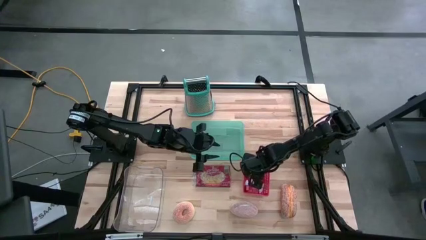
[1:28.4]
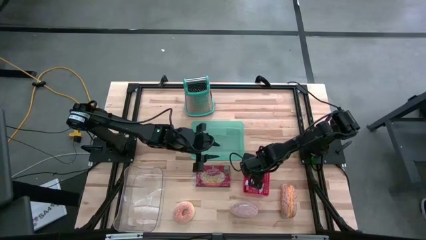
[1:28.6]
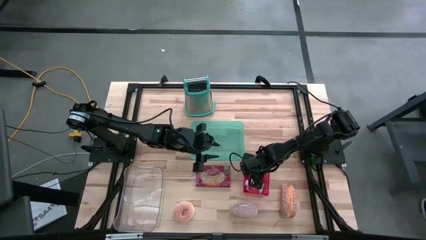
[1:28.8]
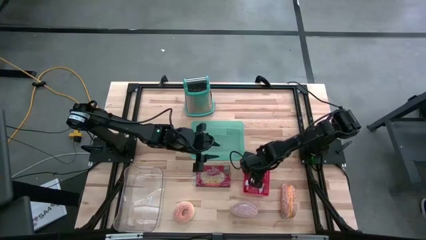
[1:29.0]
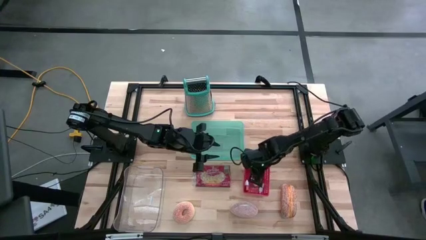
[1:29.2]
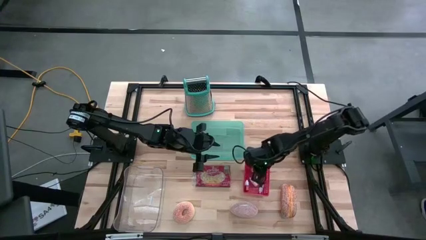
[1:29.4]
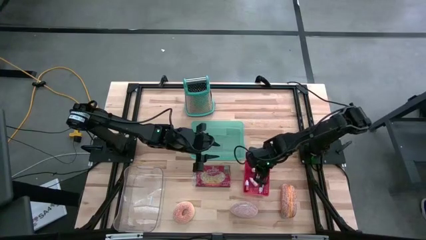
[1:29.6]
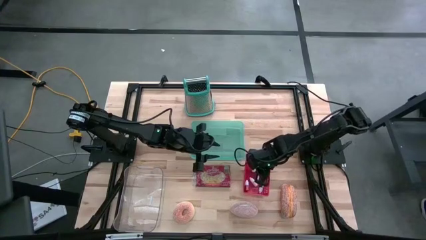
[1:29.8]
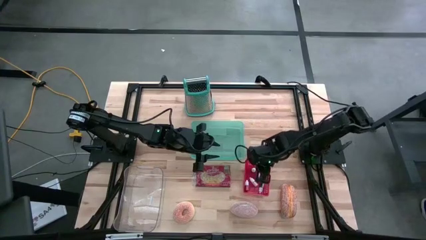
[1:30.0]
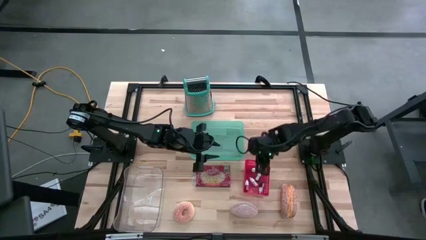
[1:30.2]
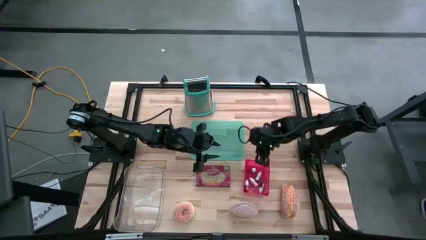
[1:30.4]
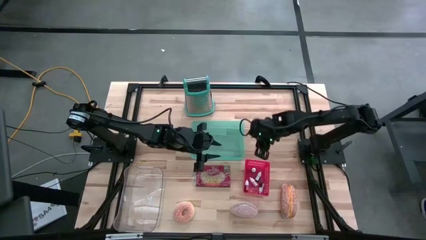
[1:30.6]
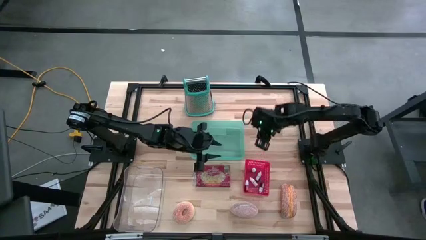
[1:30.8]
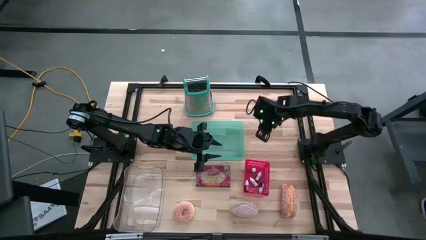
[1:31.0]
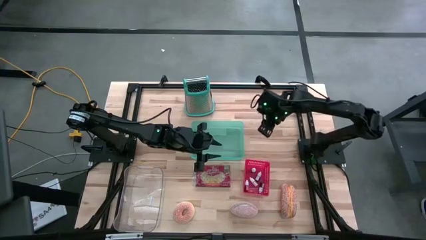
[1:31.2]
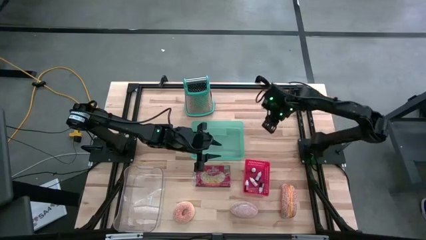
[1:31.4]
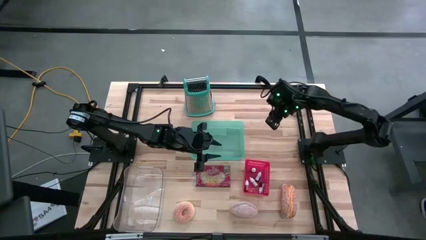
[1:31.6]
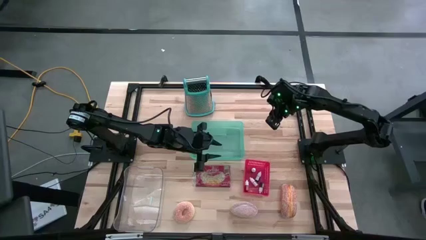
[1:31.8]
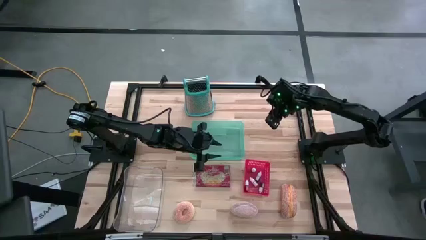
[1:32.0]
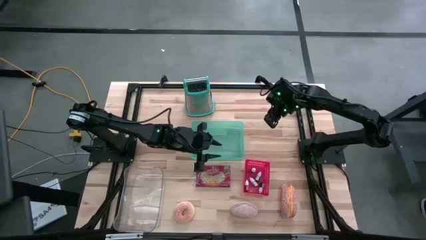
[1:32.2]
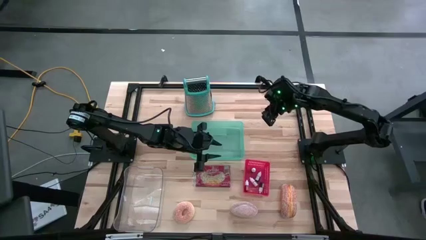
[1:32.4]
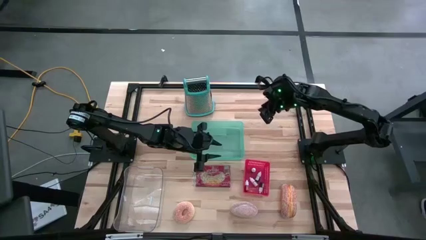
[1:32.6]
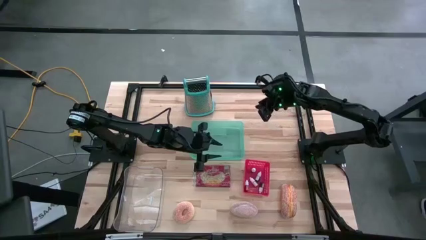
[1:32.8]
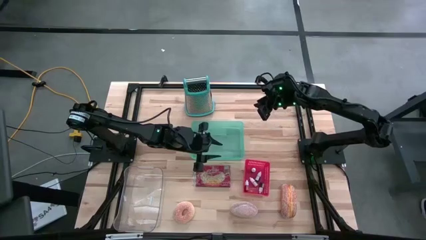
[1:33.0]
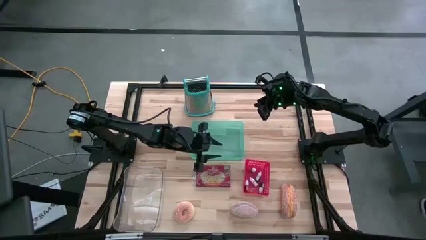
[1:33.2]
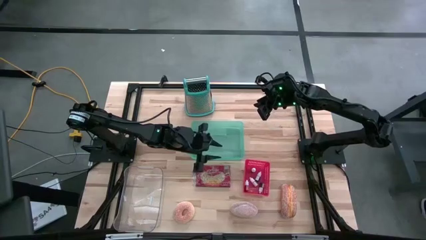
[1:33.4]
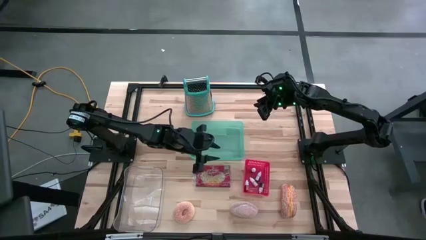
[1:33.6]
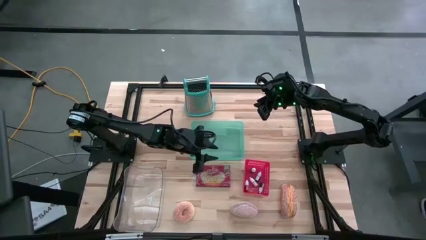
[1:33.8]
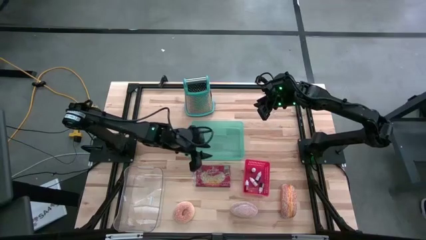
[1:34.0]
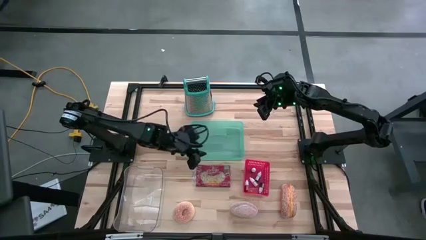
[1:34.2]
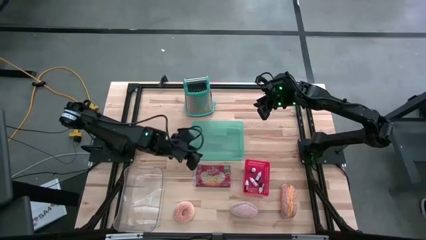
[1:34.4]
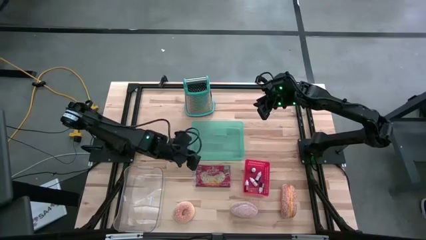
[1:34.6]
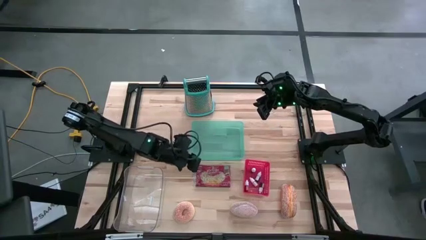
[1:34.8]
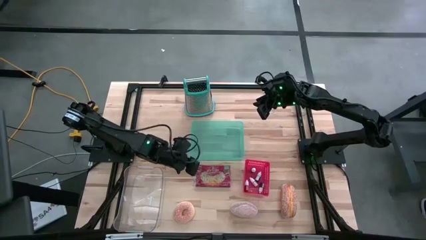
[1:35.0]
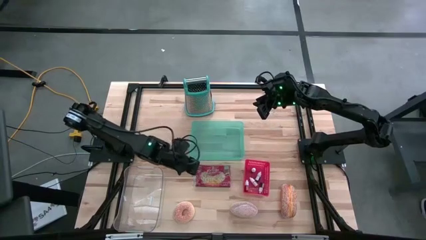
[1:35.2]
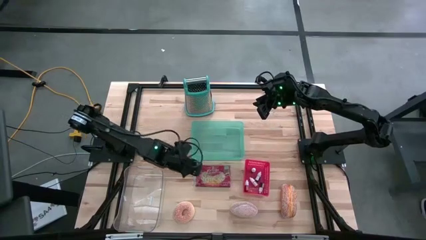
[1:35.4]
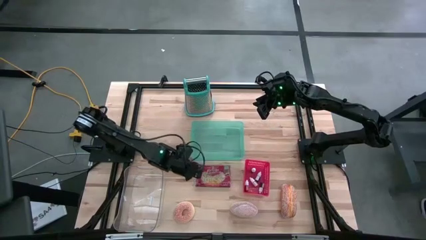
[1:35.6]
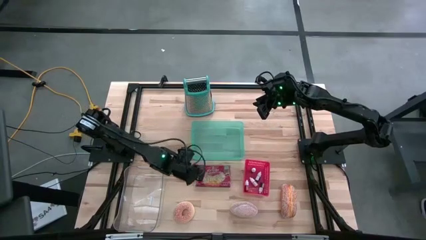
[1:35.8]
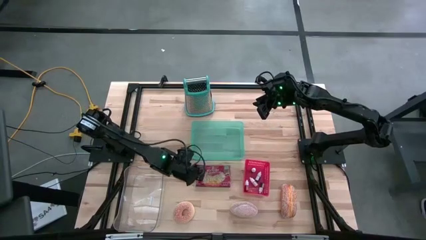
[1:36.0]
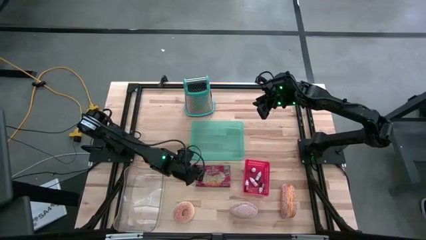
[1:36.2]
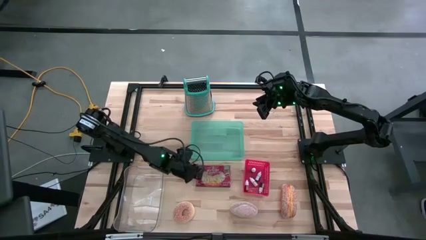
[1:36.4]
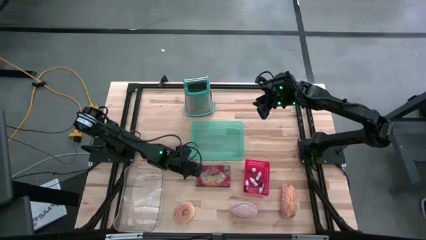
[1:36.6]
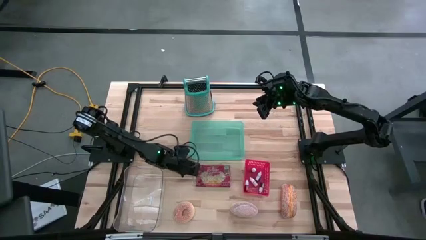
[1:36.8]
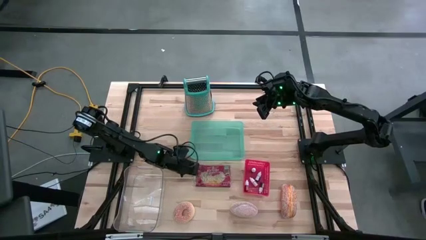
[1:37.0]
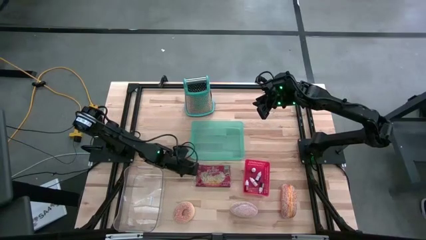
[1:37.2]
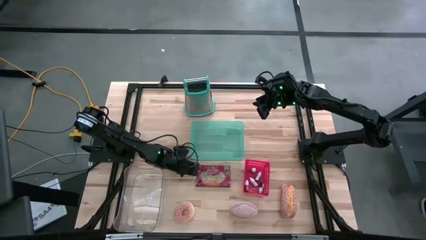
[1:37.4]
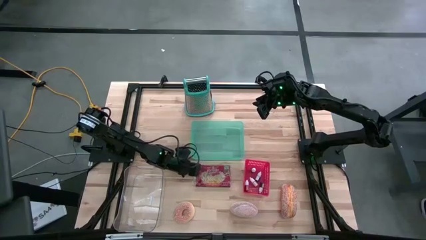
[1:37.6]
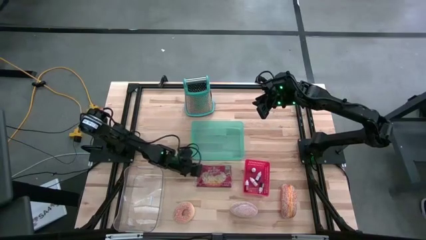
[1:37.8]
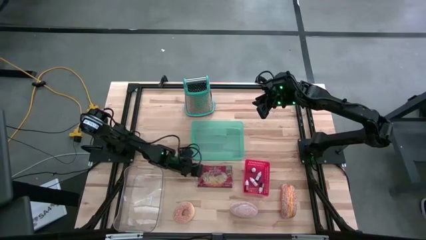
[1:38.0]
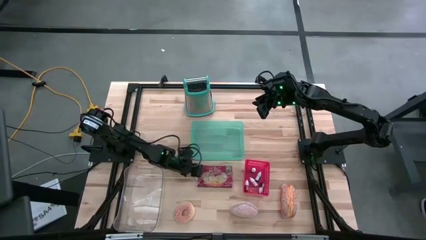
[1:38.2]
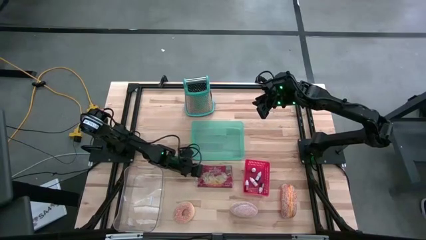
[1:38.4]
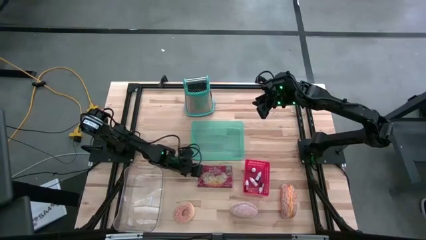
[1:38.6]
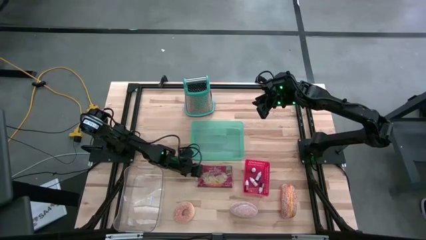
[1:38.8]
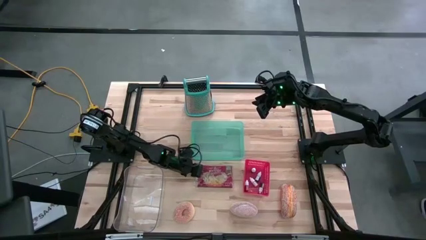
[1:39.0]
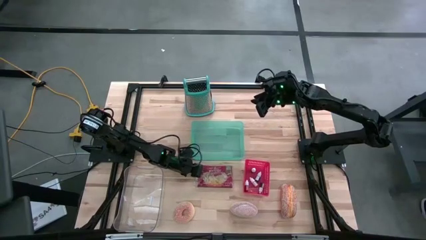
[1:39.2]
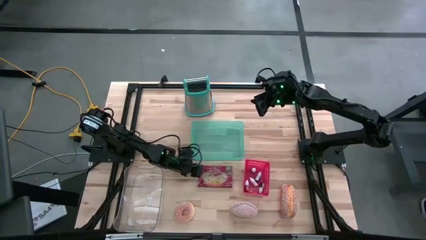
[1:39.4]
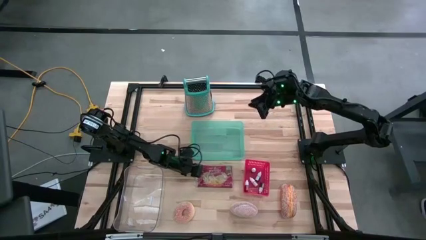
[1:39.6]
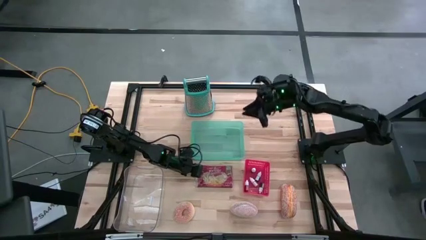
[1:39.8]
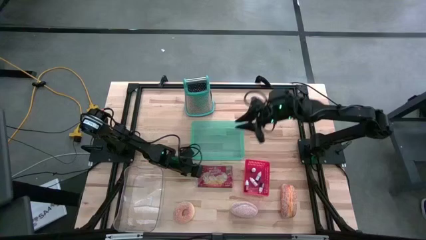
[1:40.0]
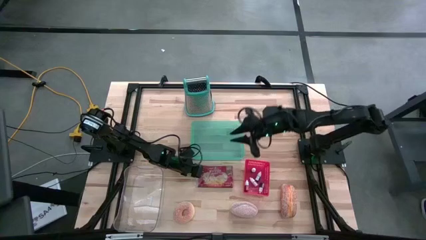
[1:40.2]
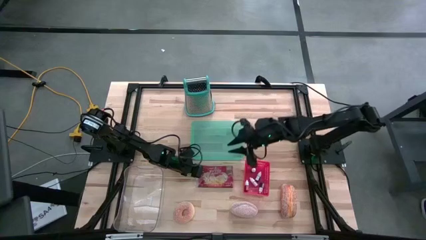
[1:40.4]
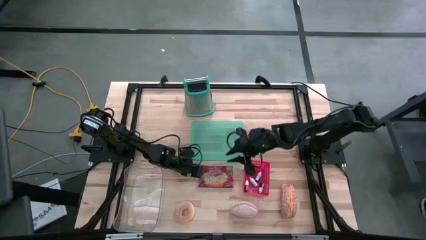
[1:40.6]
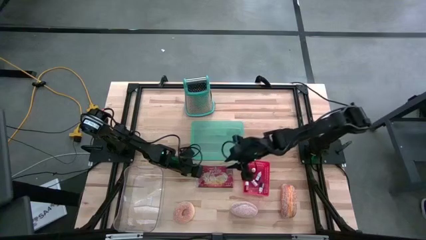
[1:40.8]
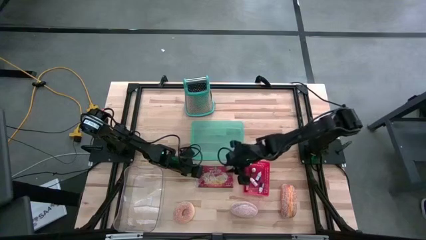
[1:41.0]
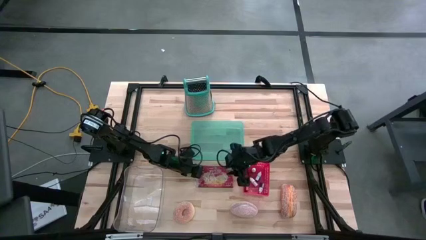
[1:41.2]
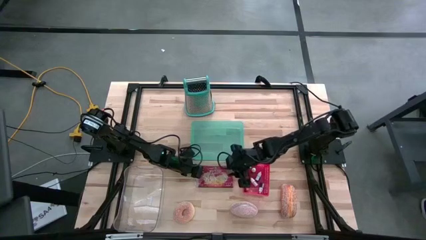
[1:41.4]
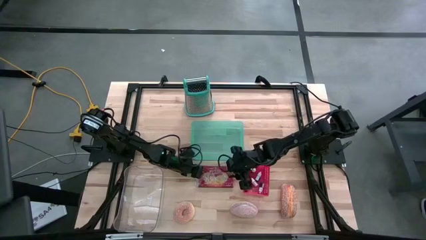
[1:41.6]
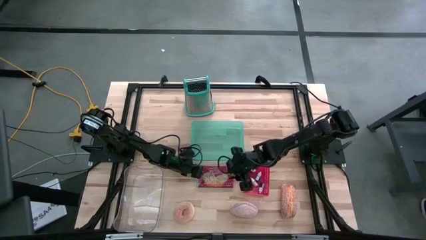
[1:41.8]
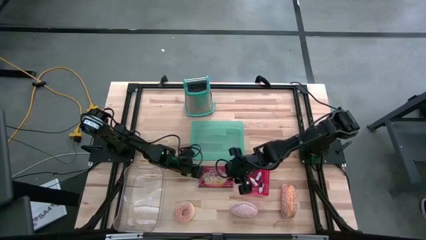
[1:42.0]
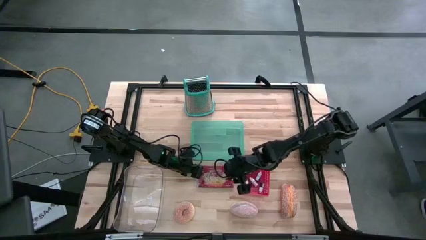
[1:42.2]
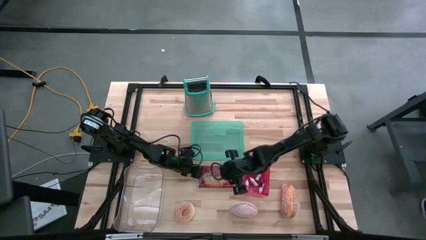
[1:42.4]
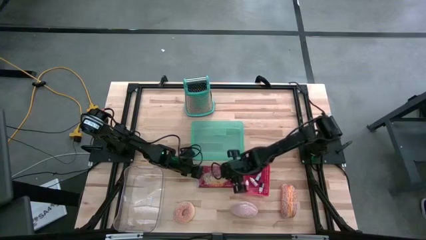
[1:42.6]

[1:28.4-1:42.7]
Task: Pick & Place Food Item
Put the popcorn bag into the green bin

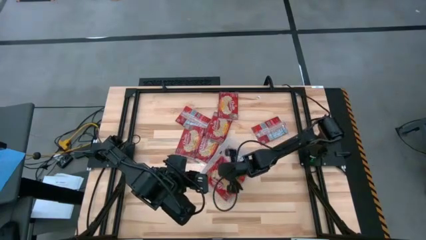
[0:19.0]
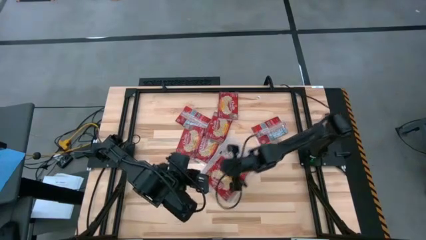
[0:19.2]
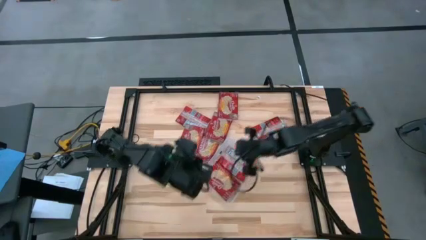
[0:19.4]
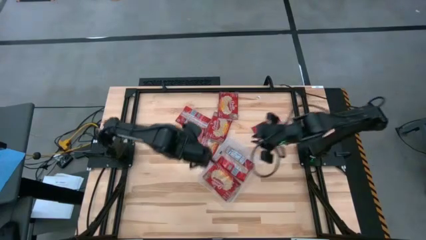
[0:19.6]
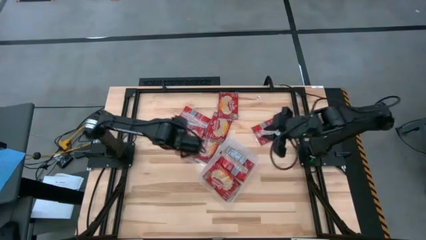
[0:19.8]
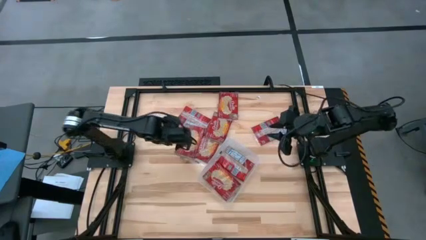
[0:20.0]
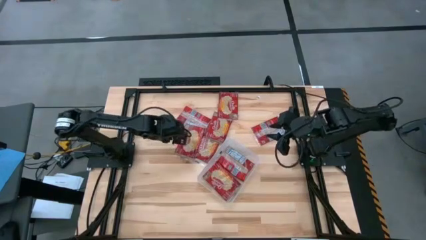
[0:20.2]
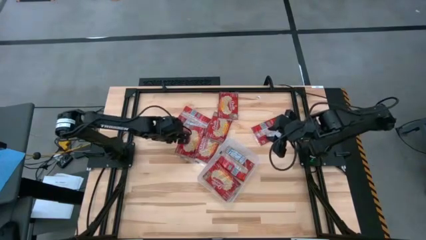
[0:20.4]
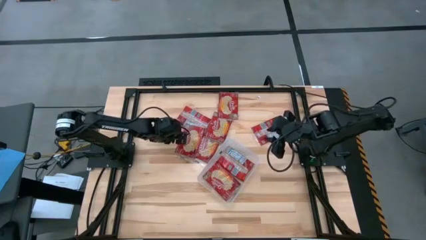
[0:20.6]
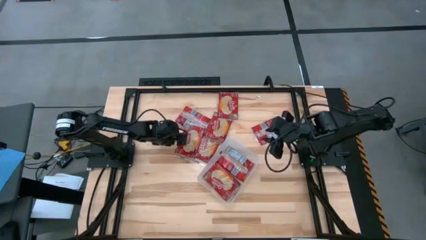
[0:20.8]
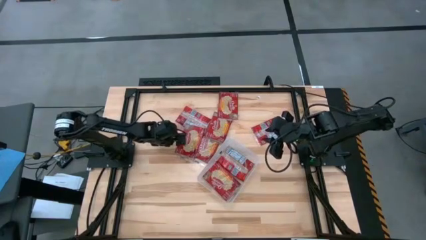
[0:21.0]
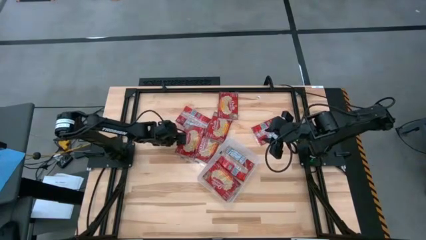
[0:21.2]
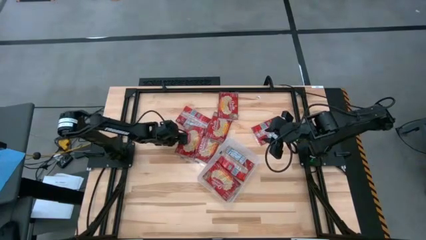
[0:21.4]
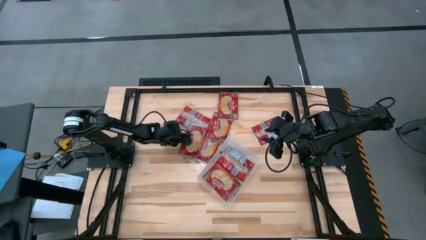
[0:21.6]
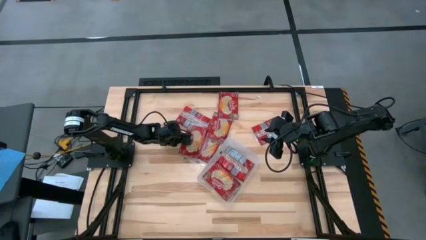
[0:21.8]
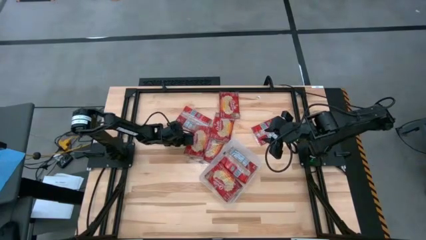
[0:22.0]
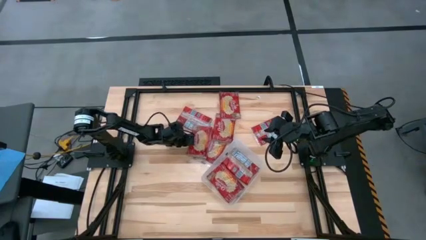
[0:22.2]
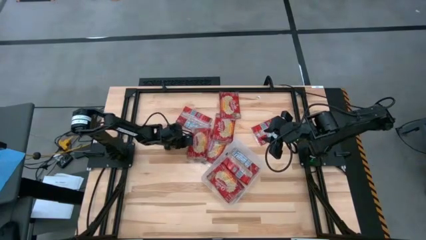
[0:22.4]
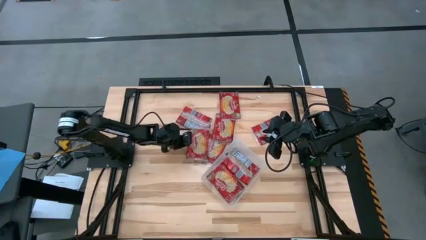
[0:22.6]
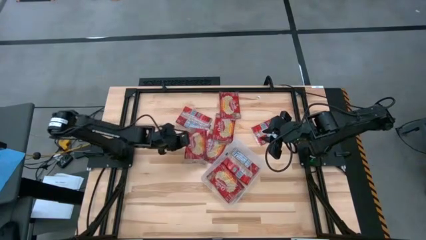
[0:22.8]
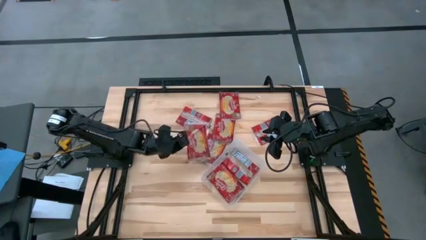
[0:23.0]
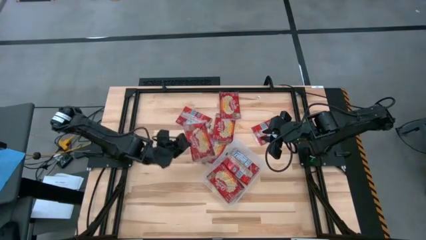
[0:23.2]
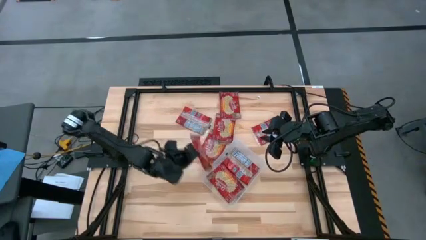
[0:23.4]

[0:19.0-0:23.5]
Task: Sort popcorn bags into baskets
Put the red popcorn bag into the transparent bin
